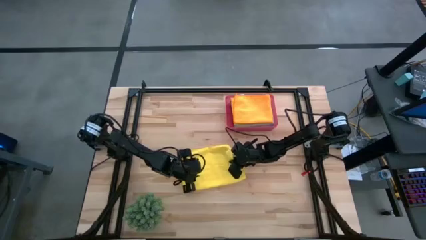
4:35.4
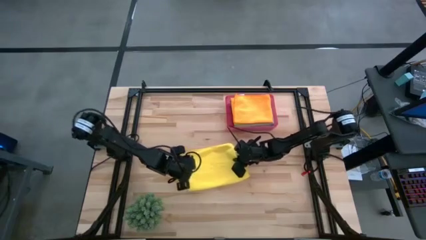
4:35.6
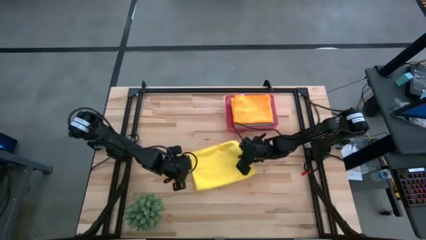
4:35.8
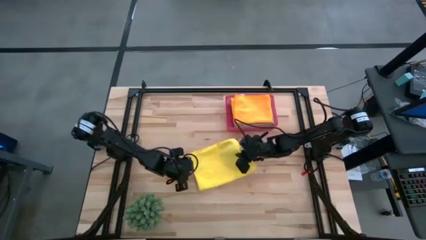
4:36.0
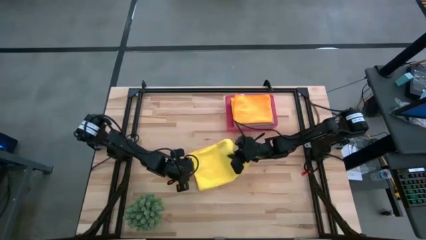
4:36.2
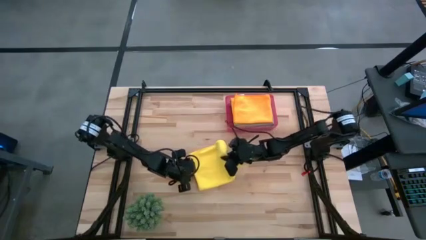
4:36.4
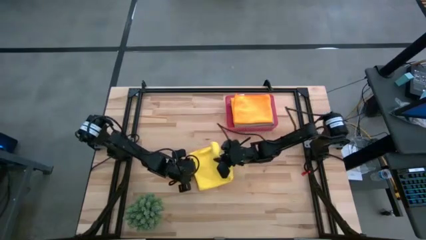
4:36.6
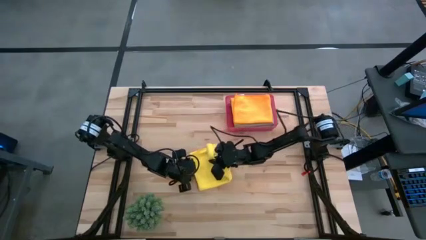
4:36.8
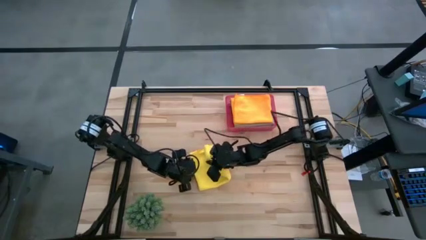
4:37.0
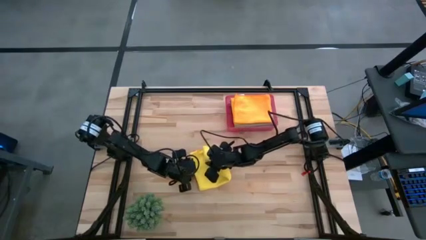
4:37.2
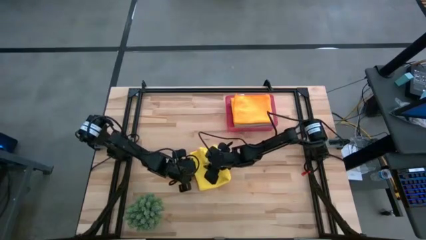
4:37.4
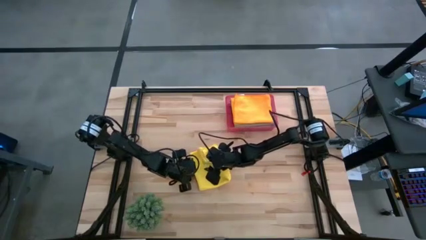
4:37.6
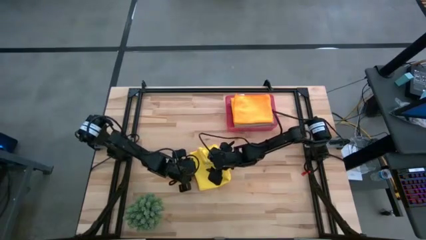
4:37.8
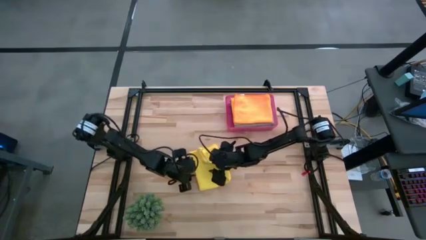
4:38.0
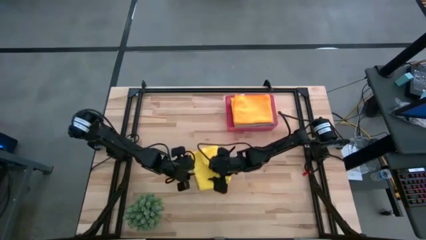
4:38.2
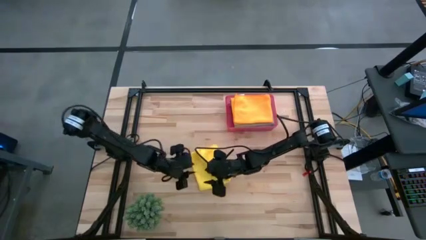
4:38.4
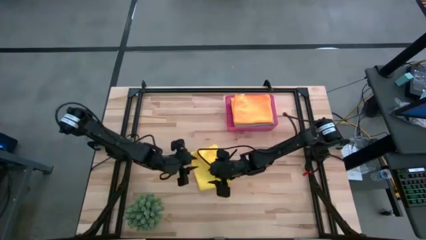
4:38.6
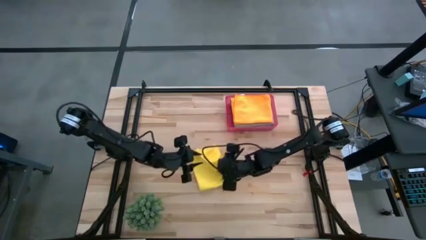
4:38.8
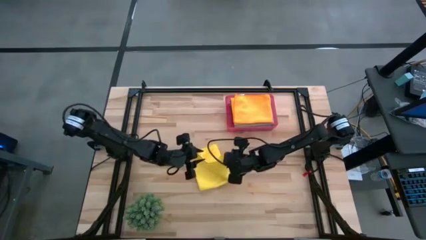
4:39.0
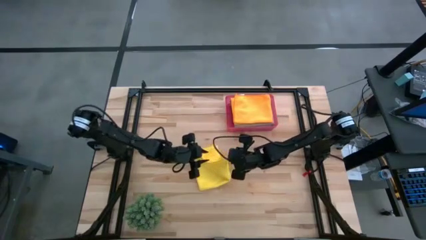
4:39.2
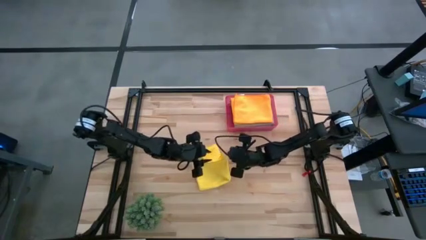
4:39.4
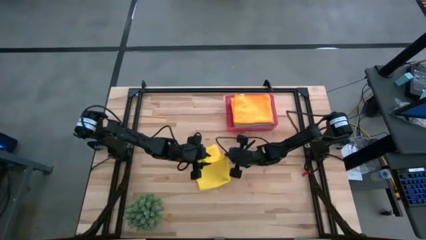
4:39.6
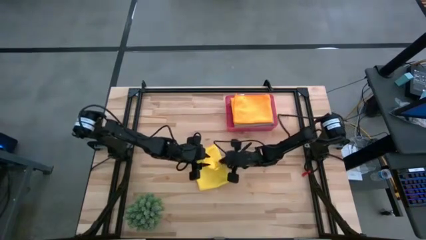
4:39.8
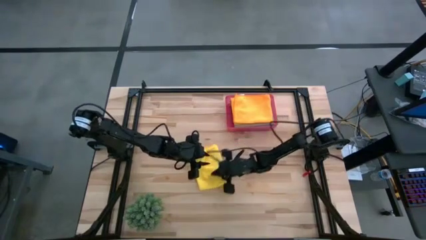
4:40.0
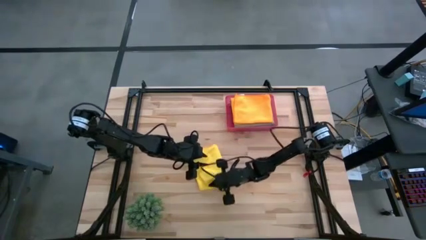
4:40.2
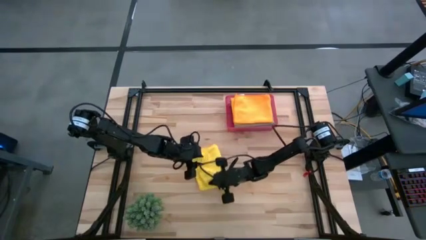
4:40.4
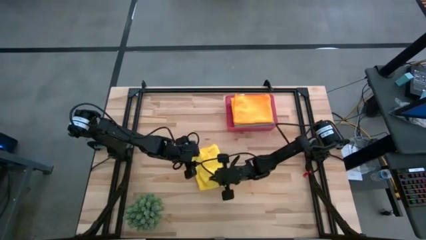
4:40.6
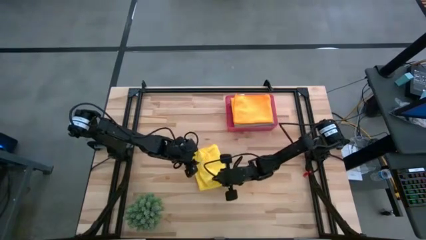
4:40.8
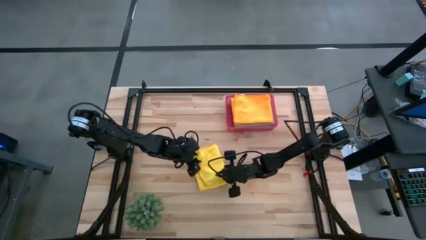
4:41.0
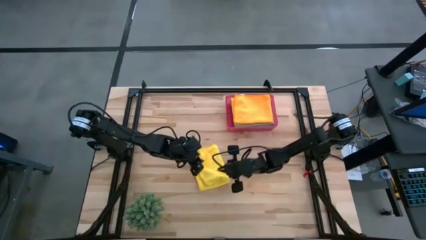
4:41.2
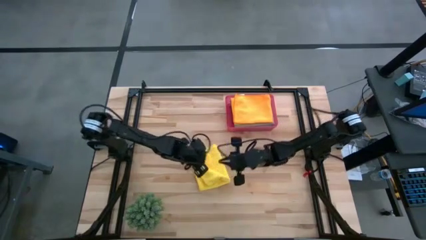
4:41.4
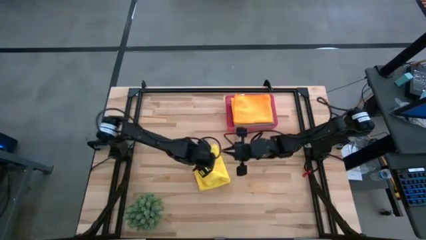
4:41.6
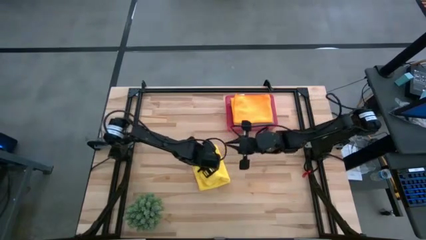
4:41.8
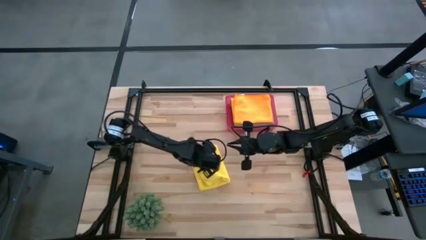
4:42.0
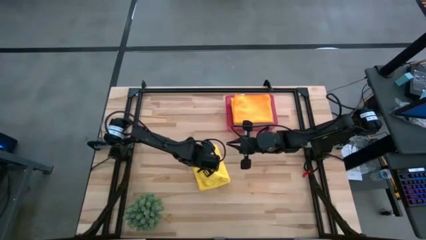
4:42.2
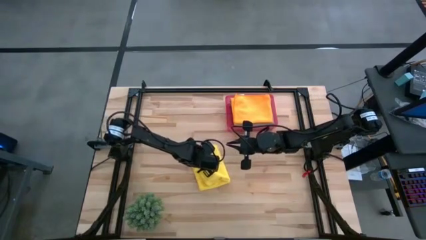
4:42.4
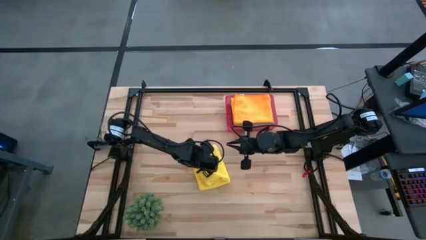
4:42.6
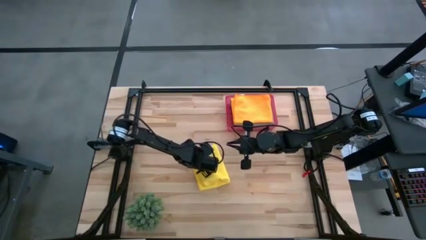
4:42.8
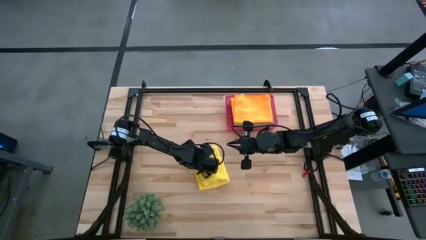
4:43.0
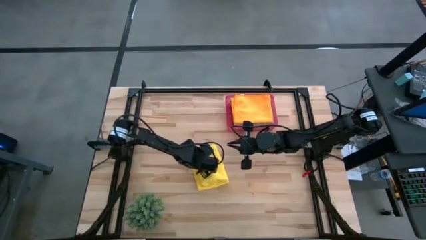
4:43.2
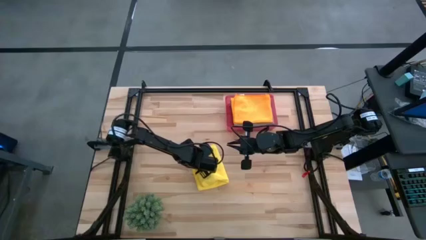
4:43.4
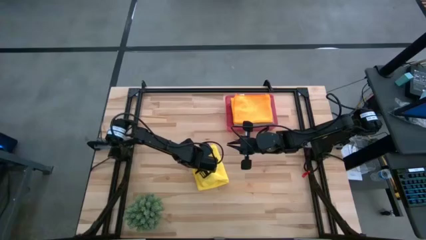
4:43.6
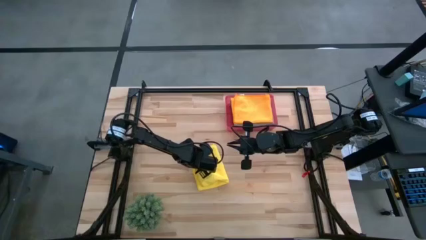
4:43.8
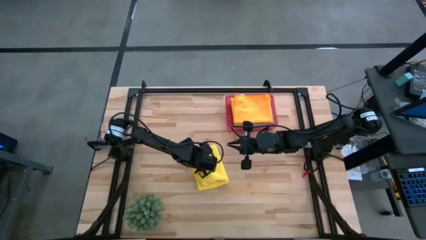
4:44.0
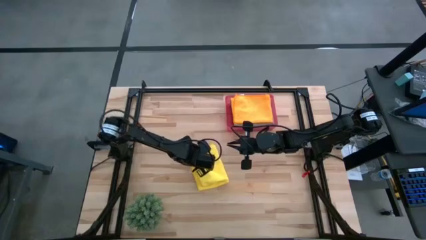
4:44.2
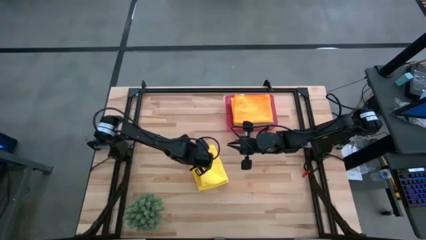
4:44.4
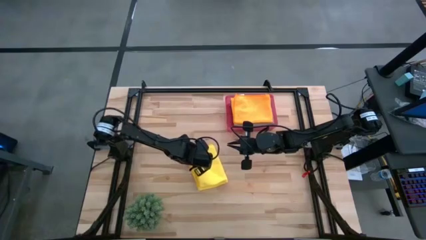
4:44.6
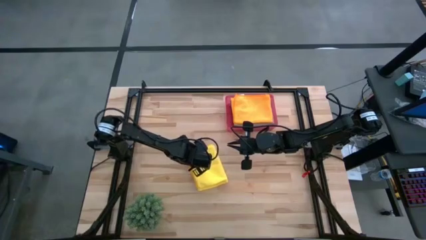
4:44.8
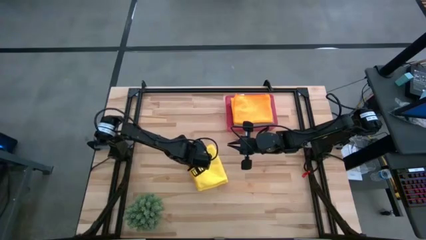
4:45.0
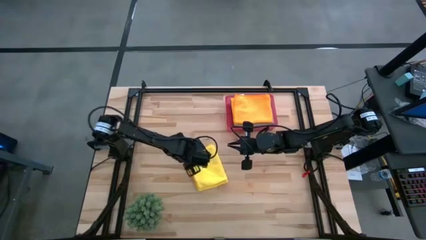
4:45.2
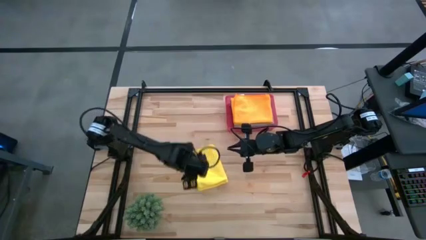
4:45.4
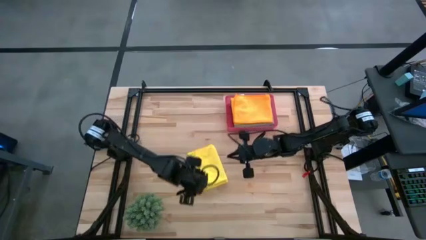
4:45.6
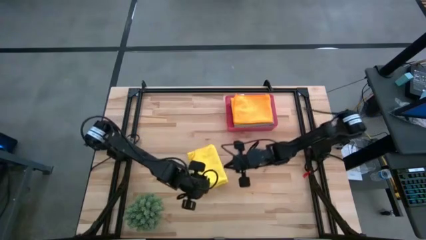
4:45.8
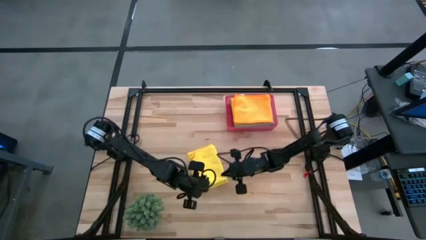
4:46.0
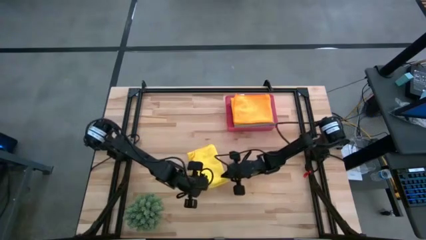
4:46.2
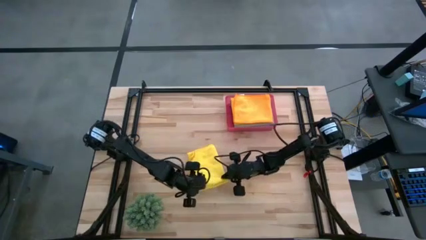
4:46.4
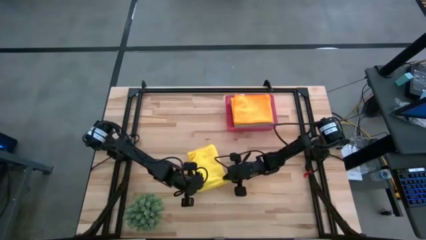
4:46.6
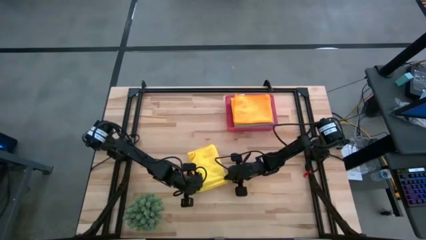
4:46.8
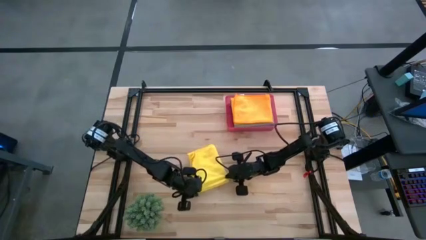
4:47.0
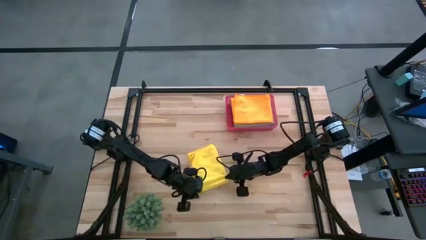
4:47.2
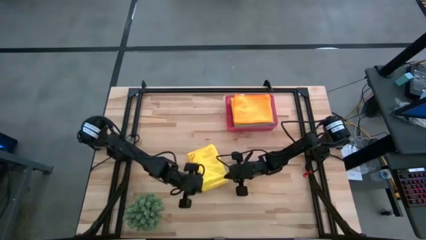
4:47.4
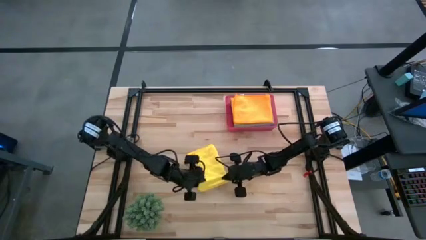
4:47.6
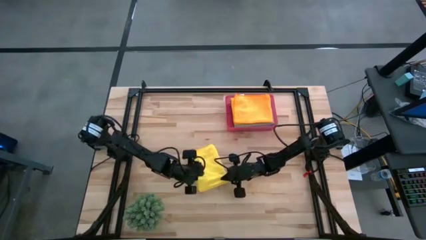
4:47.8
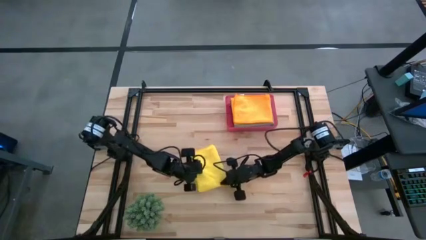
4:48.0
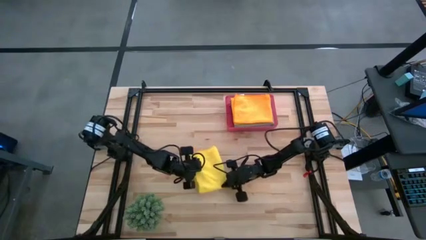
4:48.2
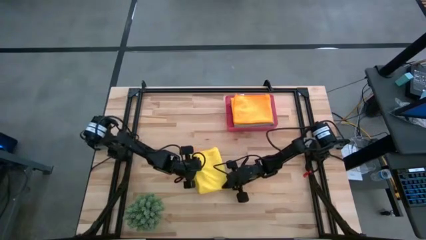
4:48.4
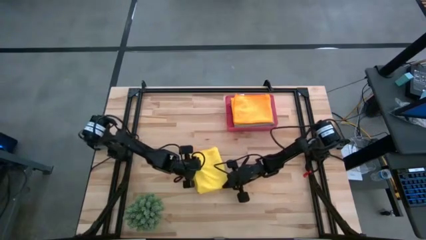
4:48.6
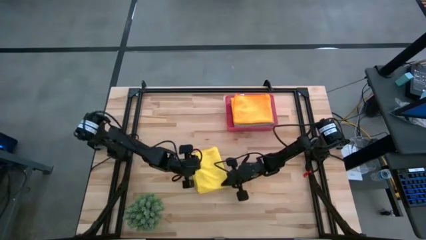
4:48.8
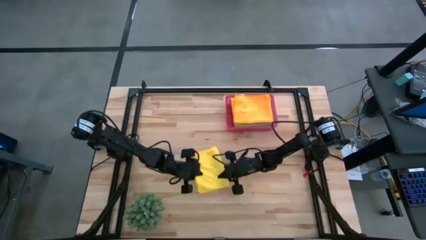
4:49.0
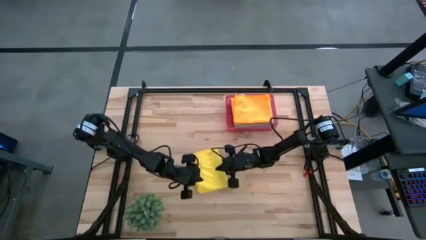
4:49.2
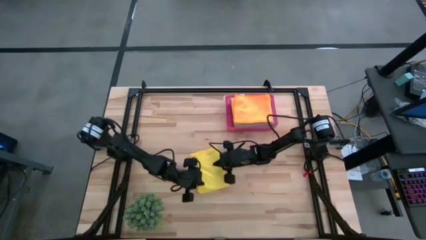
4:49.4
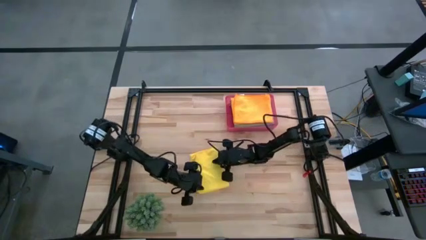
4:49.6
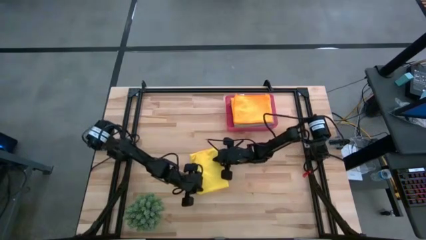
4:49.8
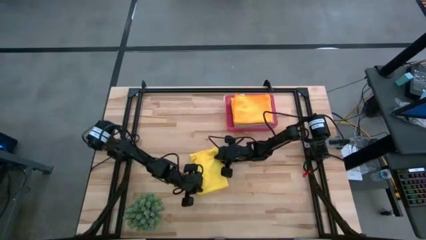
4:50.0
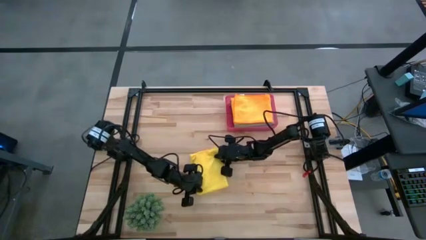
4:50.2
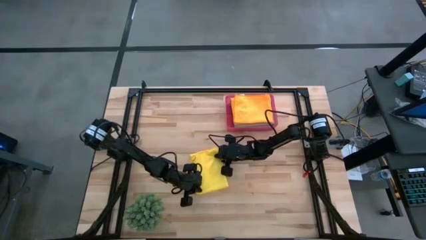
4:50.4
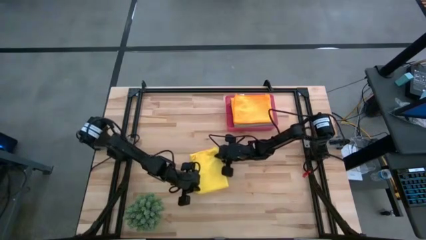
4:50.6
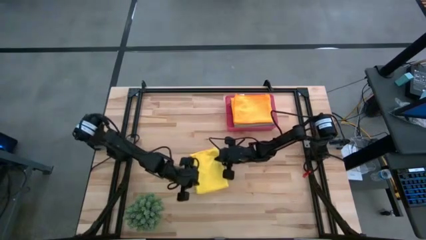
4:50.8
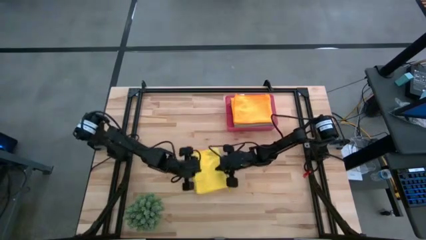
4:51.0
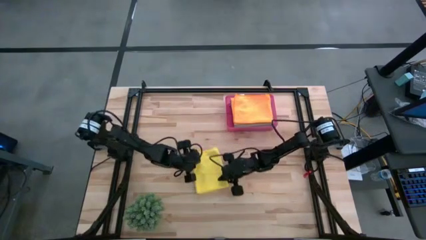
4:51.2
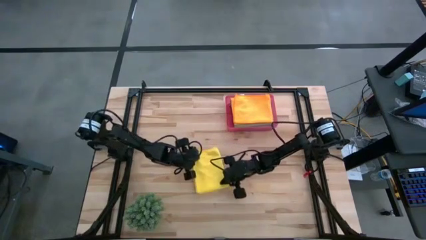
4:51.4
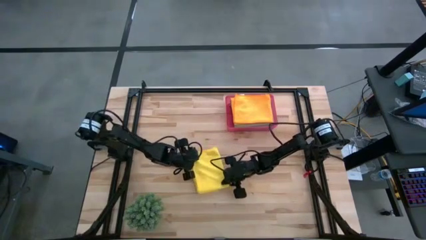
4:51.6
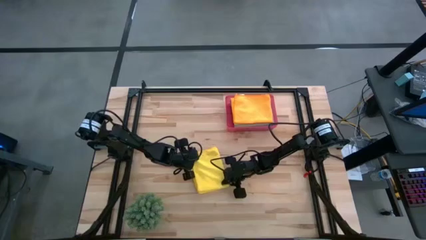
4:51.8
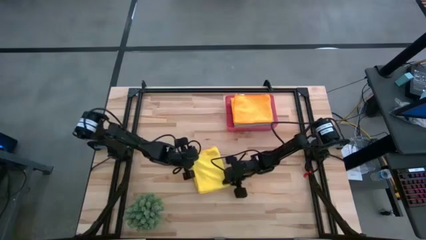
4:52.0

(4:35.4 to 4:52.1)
Task: Fold microfiber towels
Fold the yellow microfiber cloth
